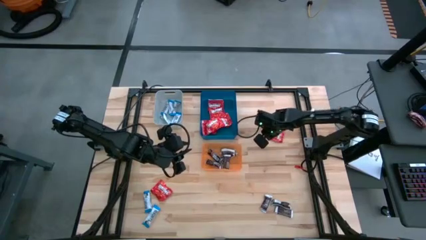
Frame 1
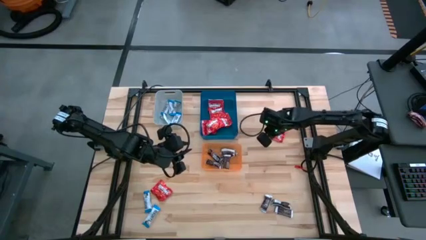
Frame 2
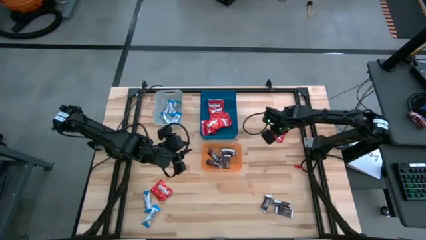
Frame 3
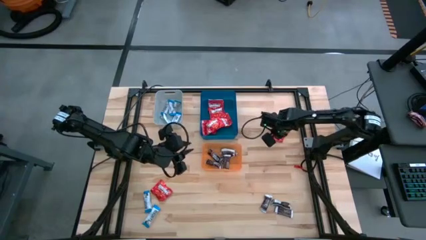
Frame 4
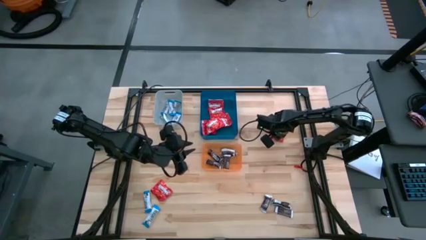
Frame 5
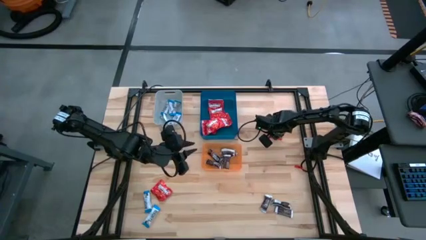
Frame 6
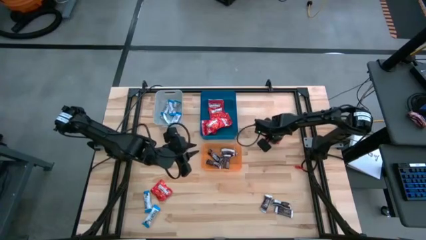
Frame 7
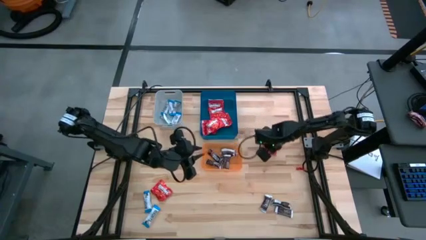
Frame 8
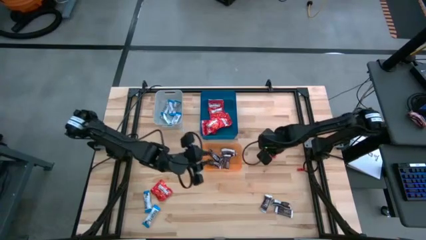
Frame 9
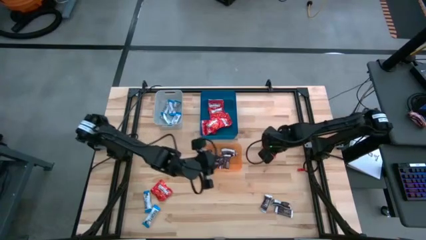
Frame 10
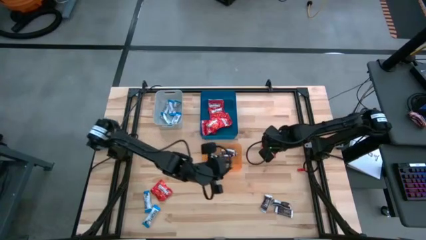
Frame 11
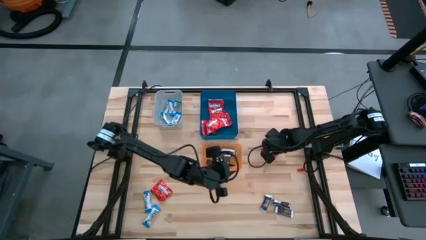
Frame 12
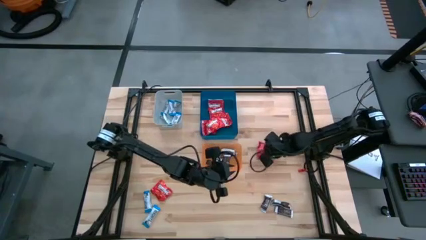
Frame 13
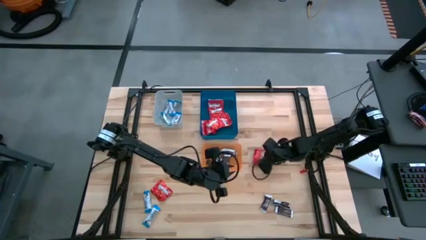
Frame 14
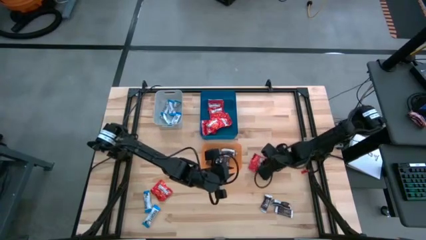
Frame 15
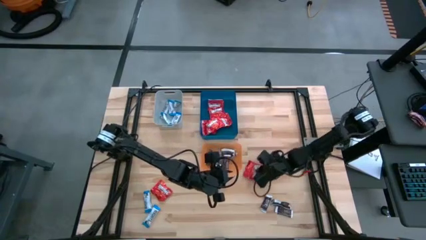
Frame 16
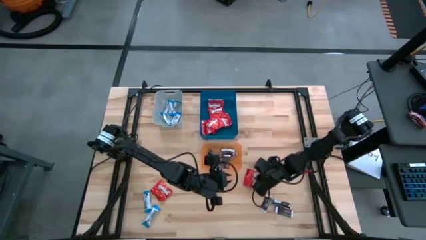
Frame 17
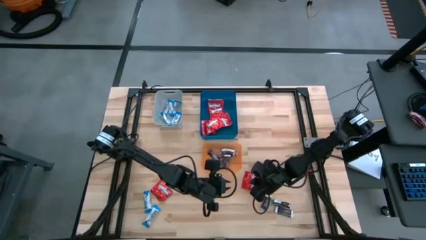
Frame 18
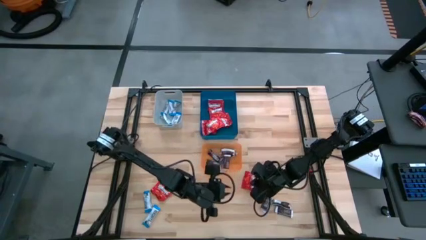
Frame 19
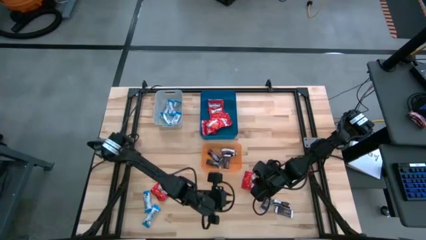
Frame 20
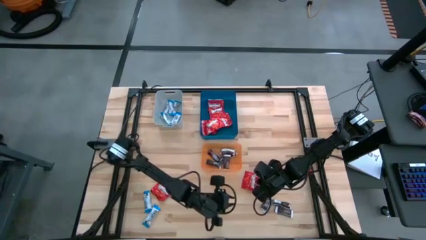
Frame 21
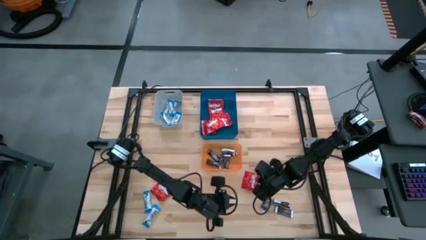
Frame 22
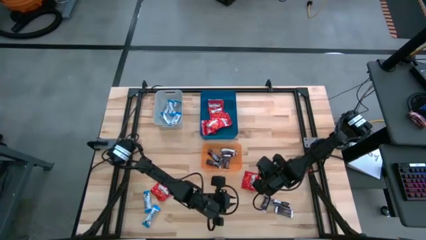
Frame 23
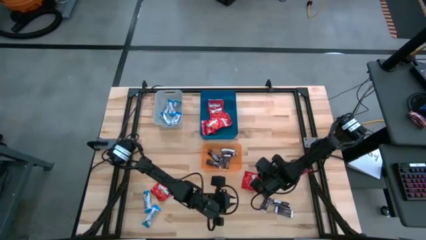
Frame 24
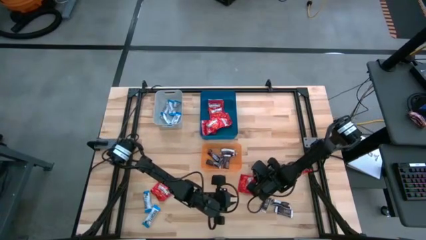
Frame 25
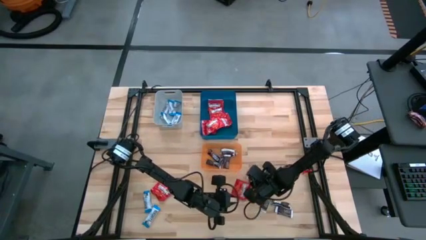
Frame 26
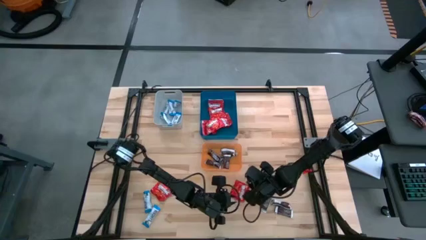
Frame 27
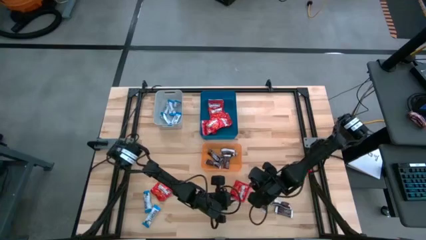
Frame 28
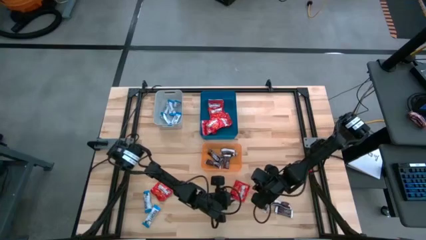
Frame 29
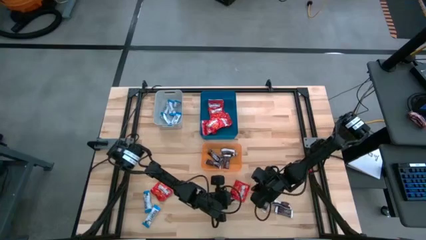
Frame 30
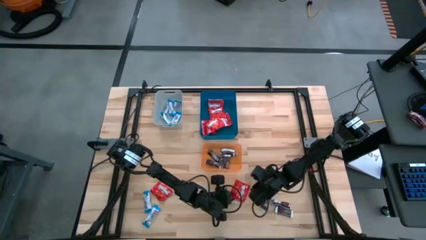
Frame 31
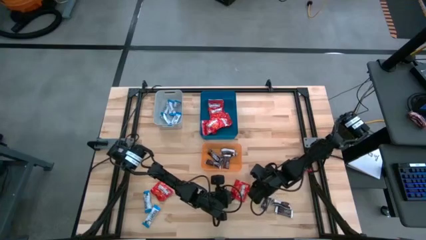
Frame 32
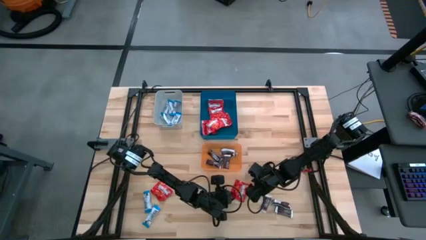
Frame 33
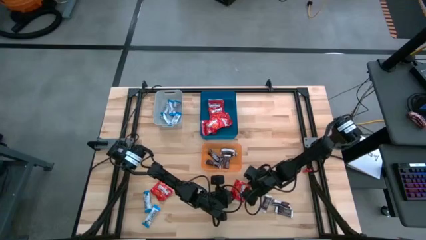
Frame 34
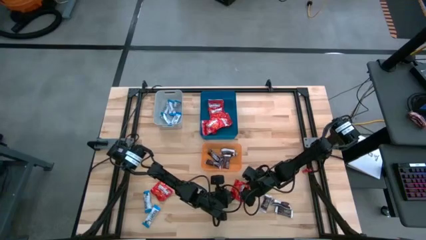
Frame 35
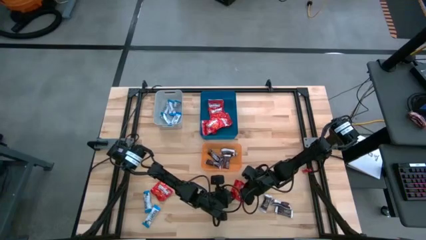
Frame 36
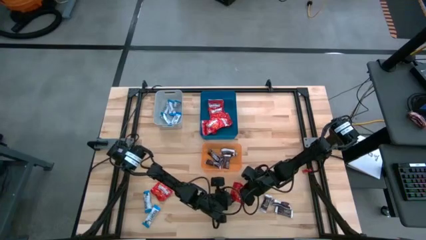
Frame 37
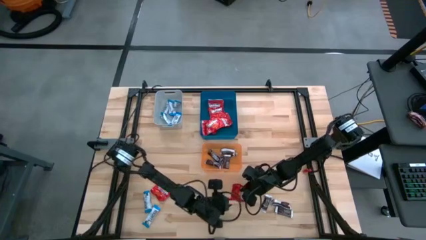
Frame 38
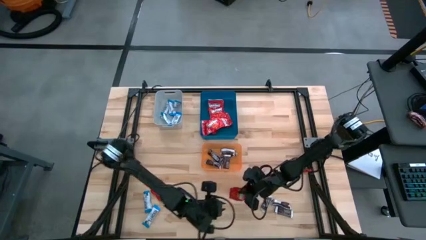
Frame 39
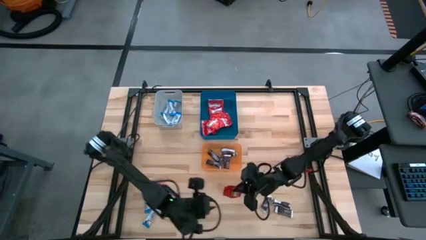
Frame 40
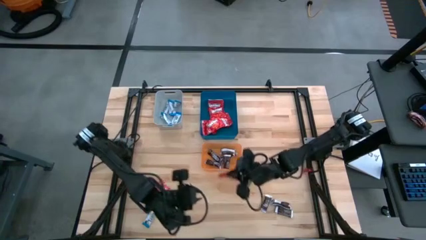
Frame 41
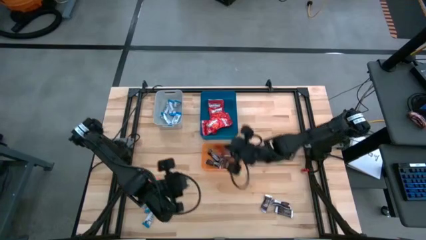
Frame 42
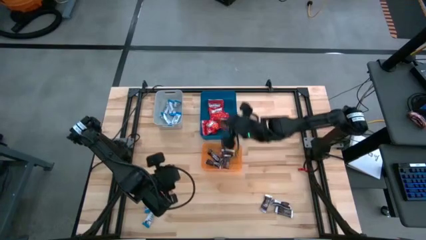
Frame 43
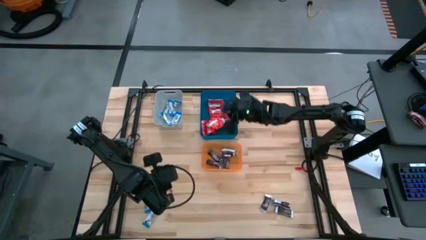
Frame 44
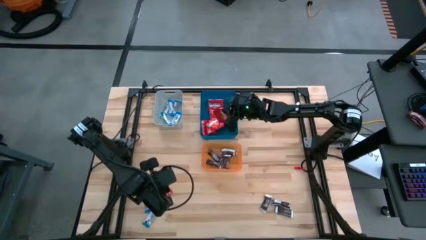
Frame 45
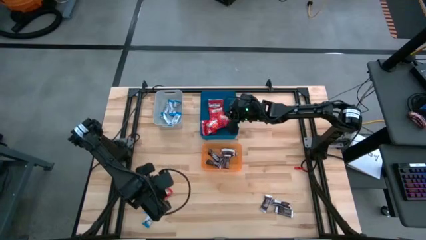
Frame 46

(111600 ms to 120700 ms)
Task: Sort candy
Put the red candy into the blue bin

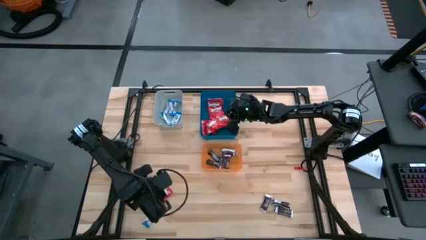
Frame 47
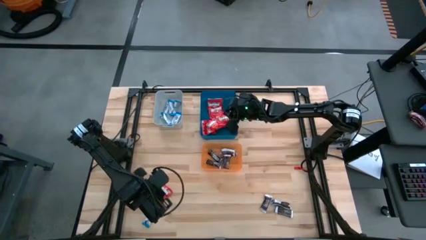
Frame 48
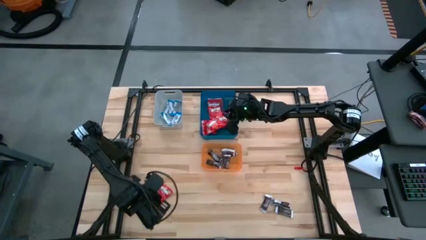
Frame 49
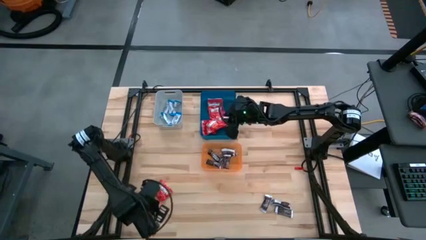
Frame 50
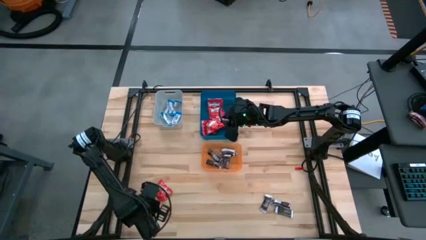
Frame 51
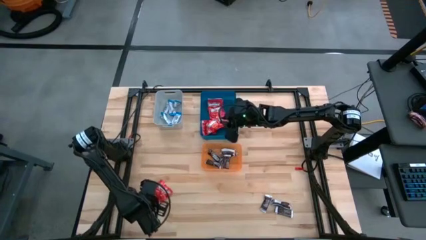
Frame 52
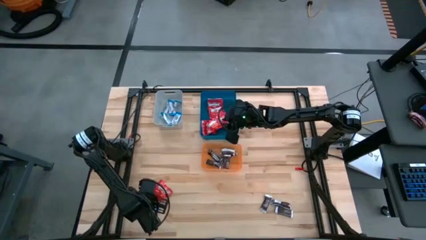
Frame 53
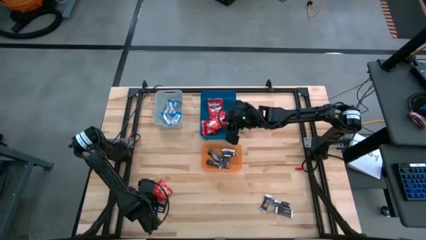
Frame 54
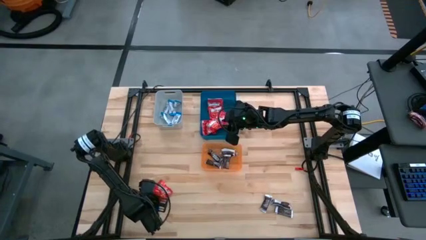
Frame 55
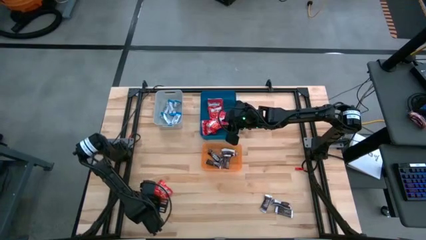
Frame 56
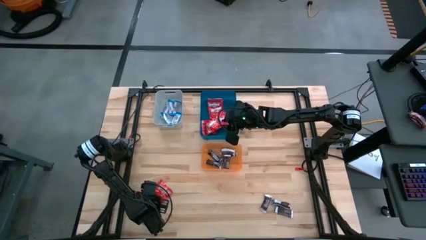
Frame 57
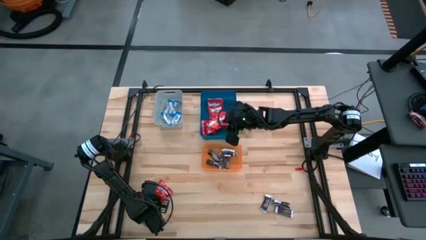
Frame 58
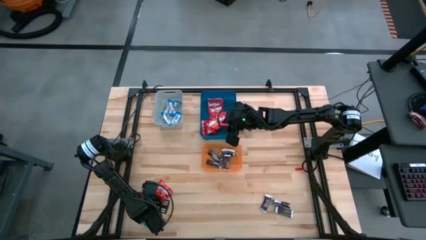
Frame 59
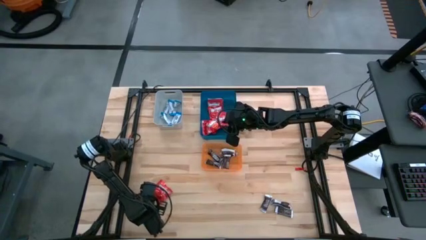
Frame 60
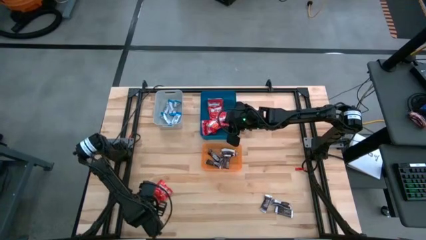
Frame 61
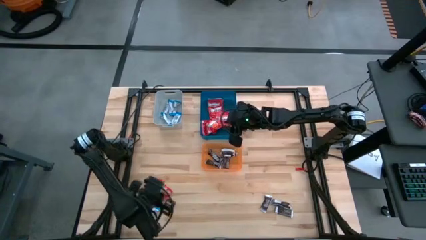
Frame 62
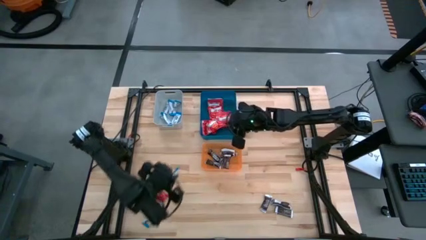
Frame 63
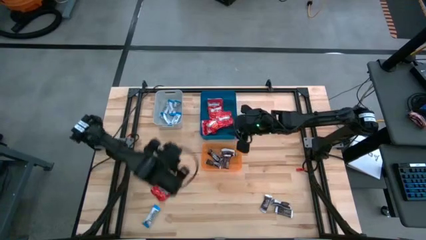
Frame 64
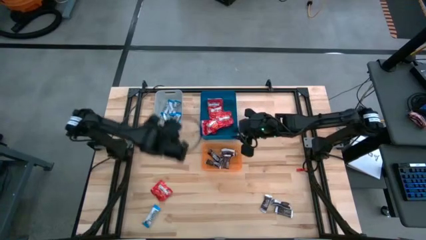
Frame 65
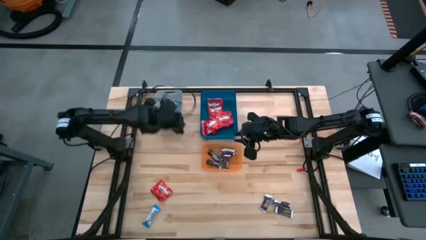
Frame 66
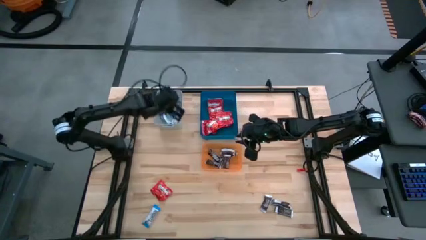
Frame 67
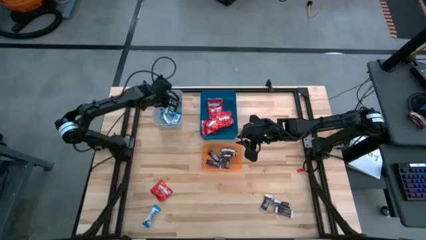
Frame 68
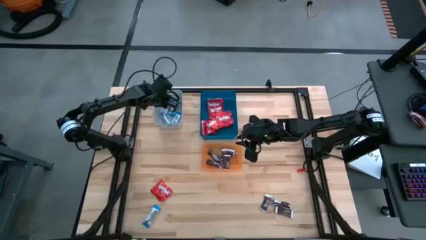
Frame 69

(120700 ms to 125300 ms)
Put the blue chocolate bar into the gray bin

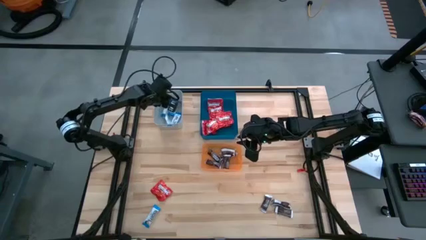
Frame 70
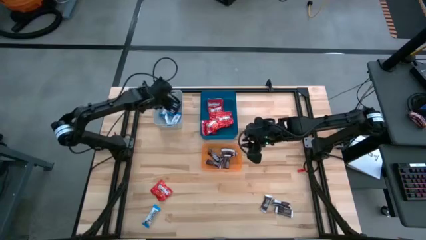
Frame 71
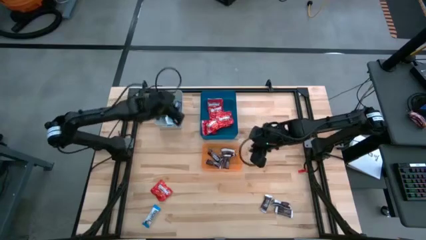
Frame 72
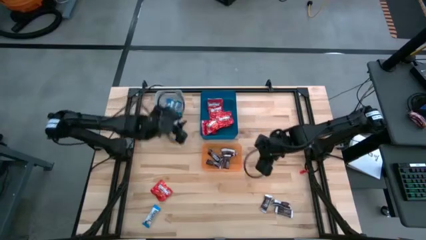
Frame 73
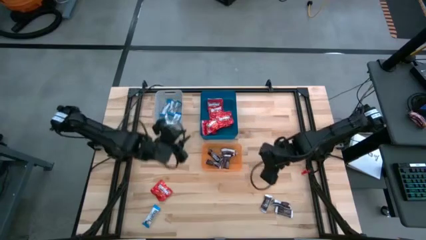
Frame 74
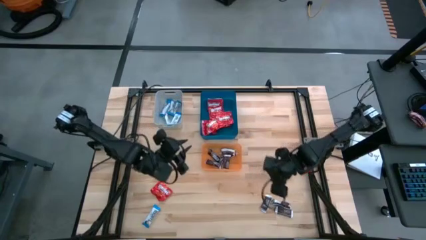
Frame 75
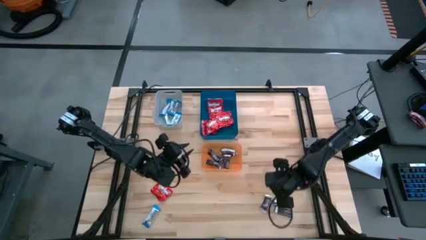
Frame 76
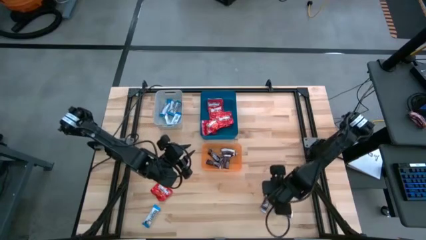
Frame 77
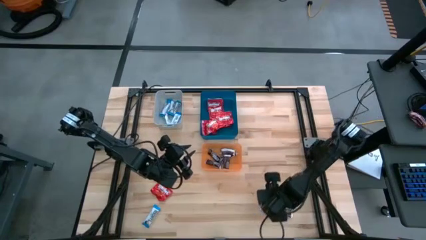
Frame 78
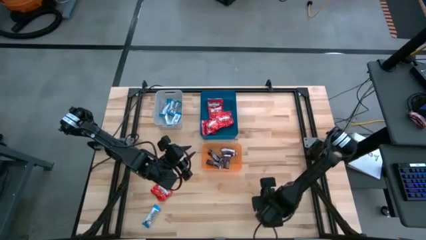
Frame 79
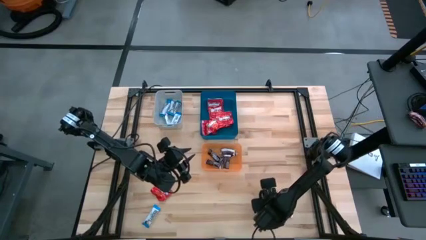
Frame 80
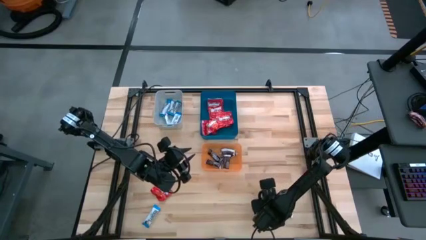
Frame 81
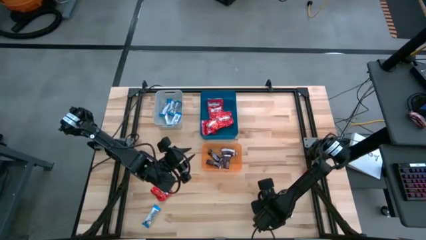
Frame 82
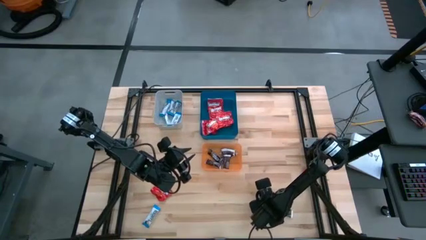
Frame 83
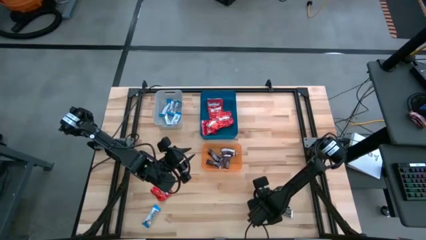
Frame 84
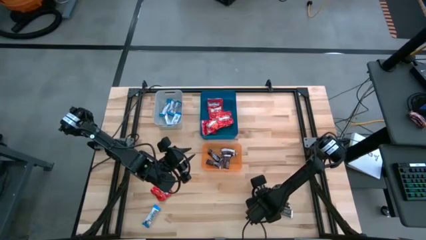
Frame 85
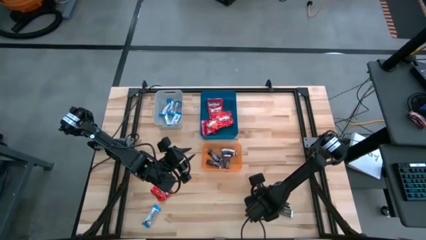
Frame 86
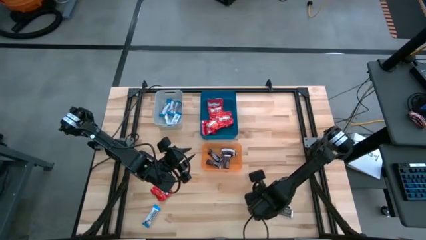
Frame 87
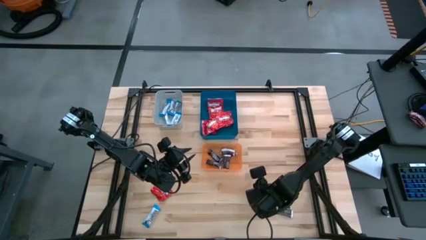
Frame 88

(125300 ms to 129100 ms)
Put the brown chocolate bar into the orange bin
